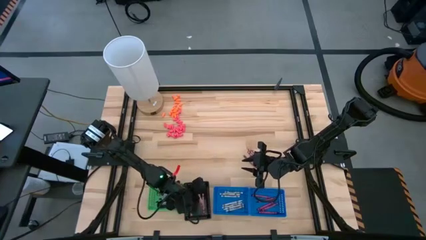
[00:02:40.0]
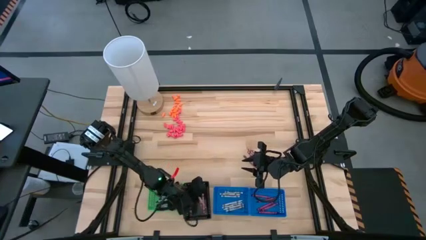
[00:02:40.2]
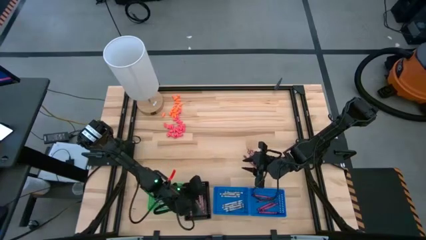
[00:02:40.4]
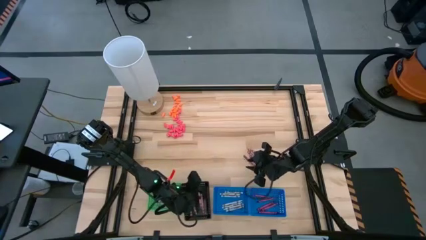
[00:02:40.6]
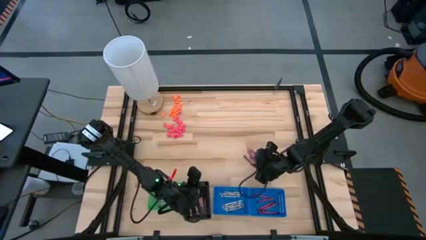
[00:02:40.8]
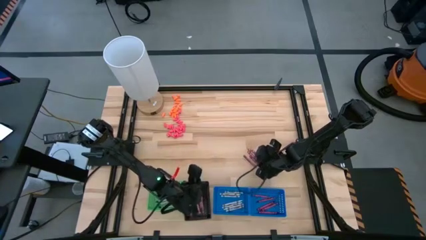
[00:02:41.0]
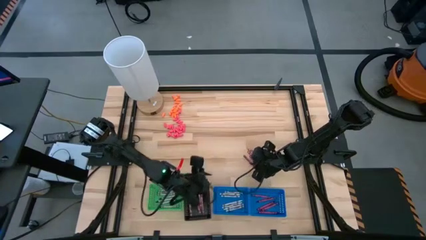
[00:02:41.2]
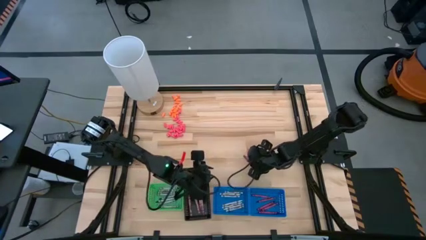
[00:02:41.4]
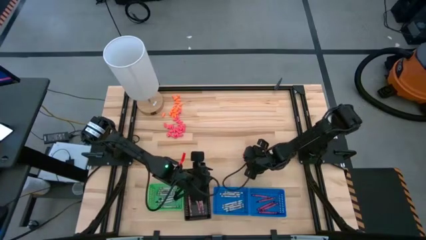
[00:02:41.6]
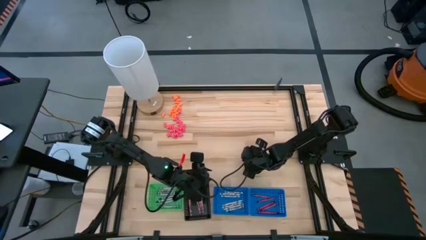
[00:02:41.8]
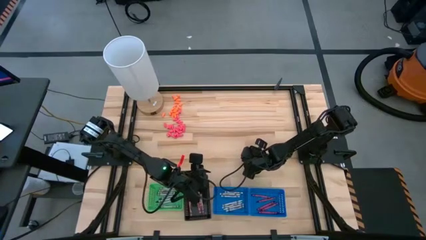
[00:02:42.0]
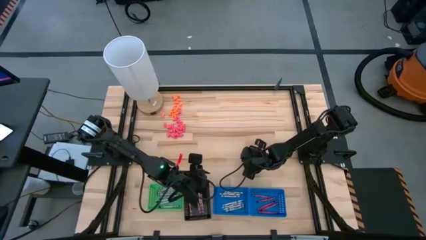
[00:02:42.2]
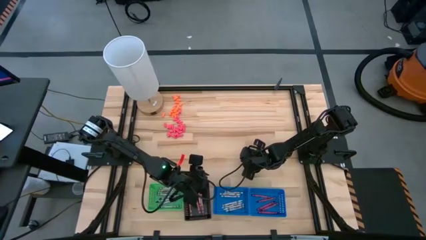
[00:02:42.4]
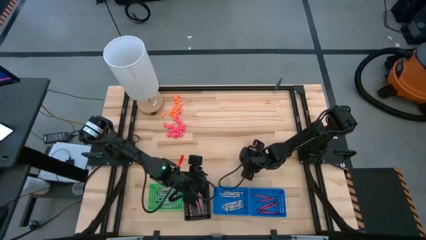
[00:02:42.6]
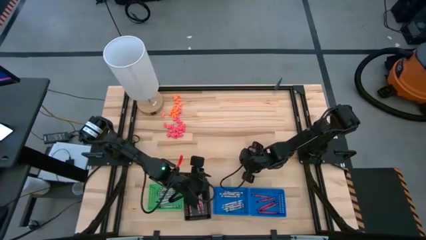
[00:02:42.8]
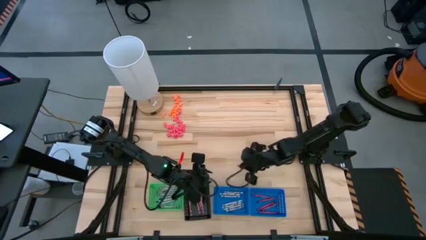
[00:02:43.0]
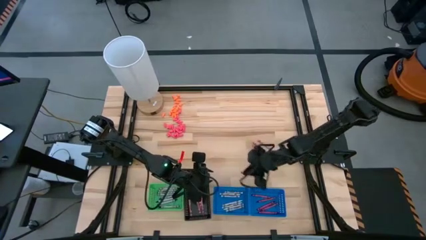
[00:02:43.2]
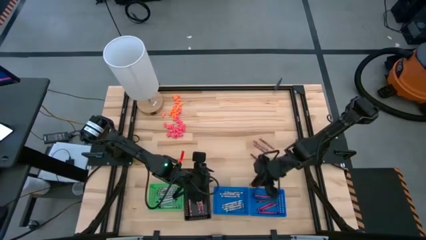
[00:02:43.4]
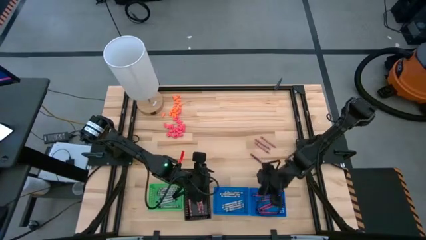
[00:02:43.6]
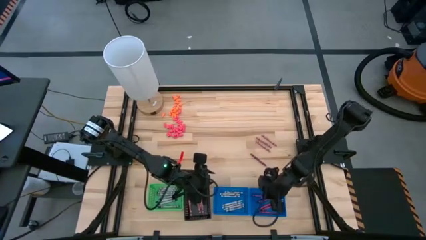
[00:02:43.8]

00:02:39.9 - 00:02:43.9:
Task: Sort crayons
Put the red crayon into the right blue bin

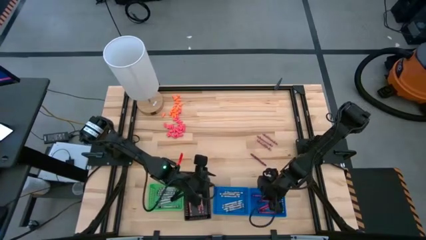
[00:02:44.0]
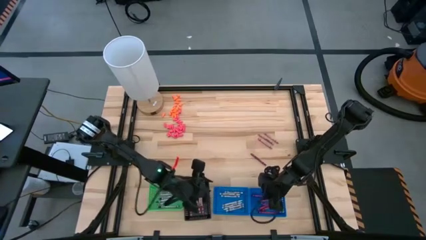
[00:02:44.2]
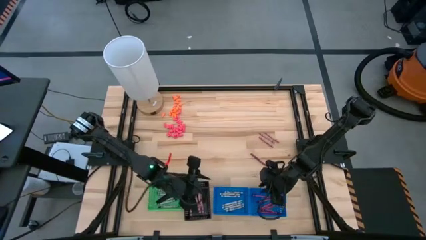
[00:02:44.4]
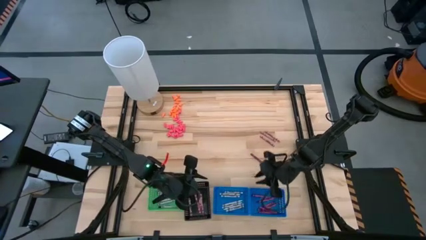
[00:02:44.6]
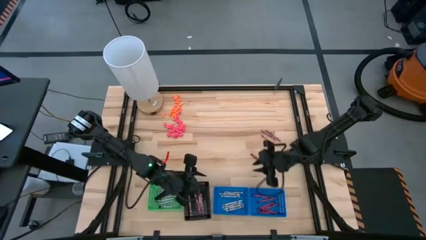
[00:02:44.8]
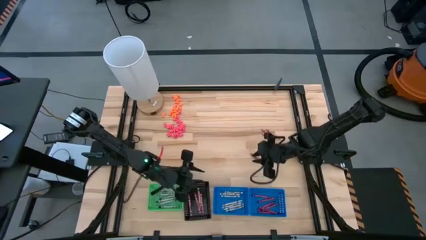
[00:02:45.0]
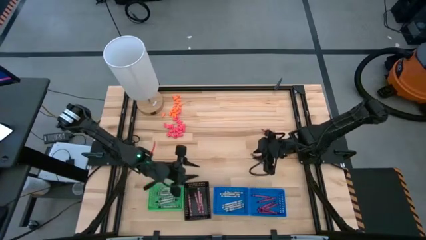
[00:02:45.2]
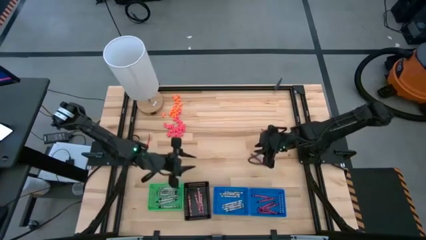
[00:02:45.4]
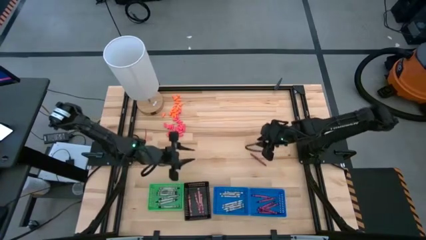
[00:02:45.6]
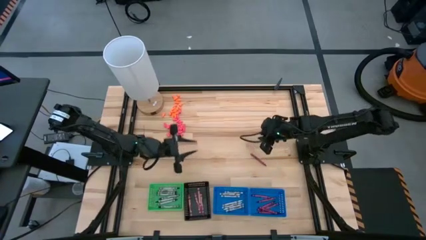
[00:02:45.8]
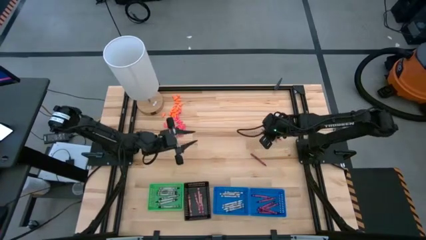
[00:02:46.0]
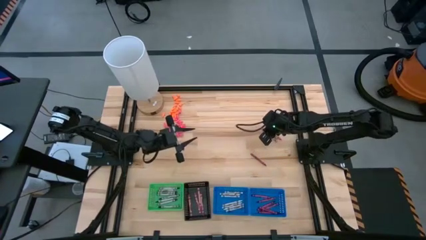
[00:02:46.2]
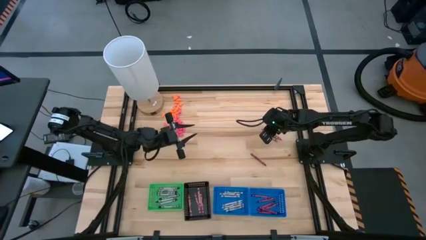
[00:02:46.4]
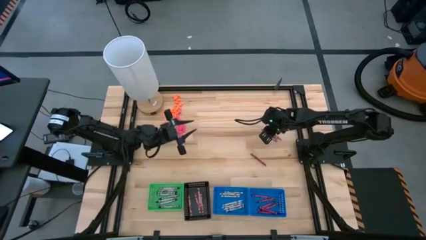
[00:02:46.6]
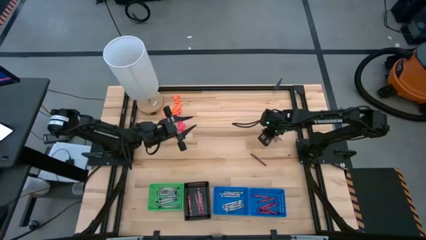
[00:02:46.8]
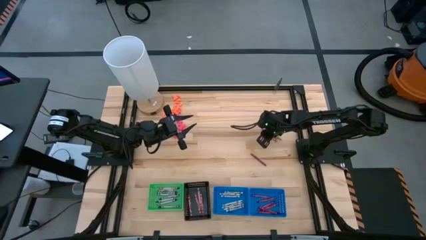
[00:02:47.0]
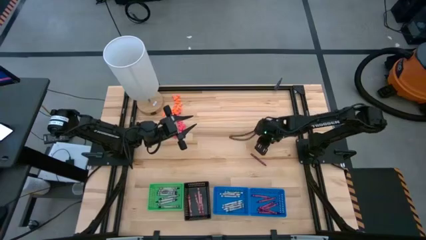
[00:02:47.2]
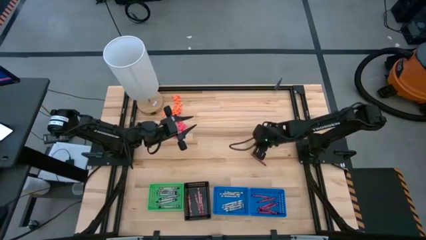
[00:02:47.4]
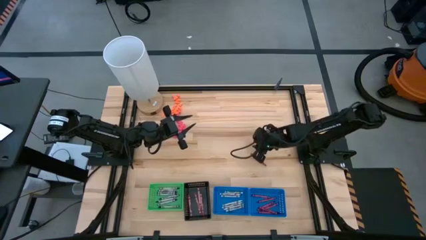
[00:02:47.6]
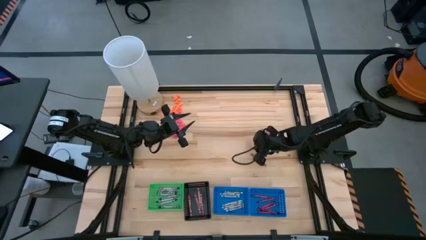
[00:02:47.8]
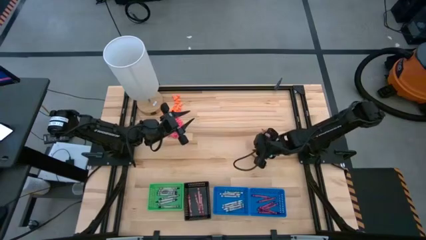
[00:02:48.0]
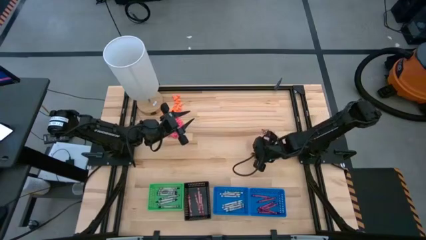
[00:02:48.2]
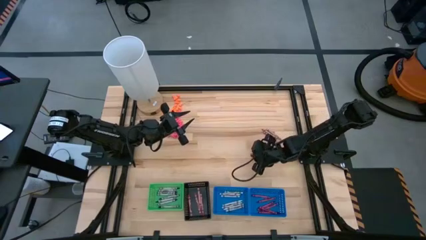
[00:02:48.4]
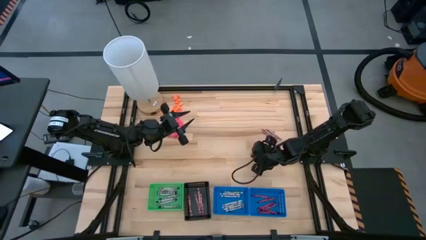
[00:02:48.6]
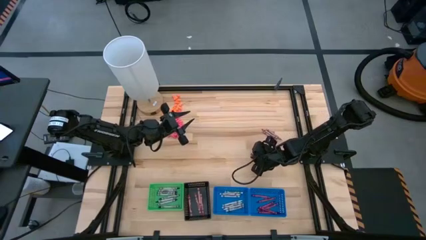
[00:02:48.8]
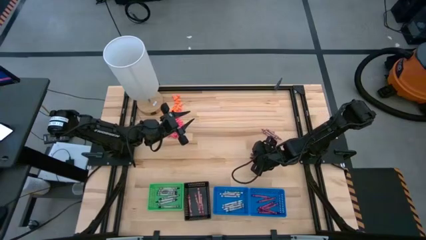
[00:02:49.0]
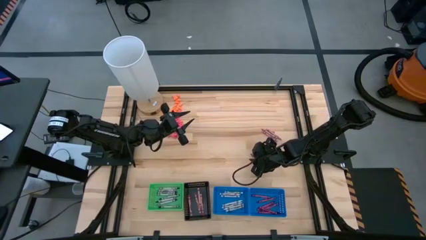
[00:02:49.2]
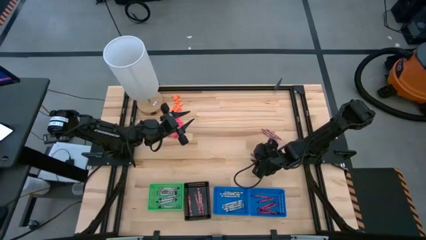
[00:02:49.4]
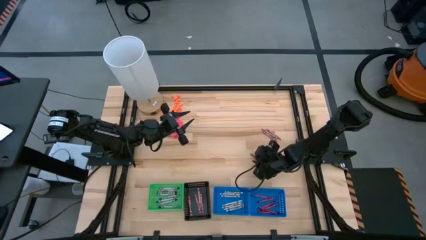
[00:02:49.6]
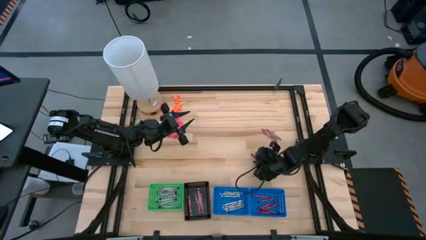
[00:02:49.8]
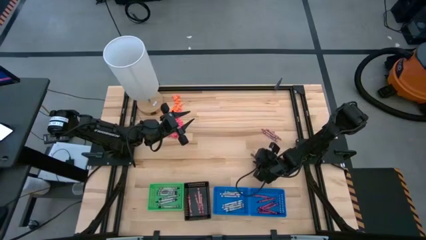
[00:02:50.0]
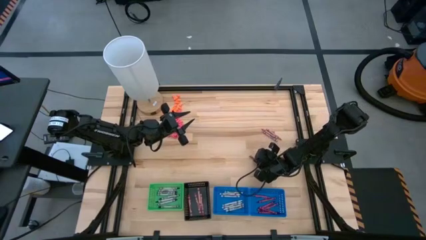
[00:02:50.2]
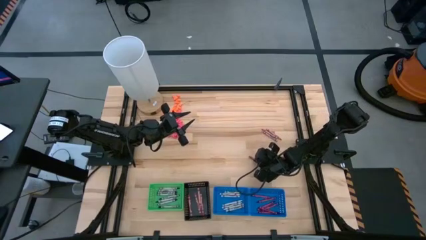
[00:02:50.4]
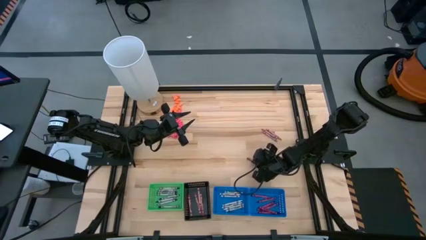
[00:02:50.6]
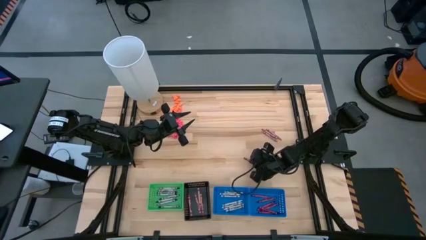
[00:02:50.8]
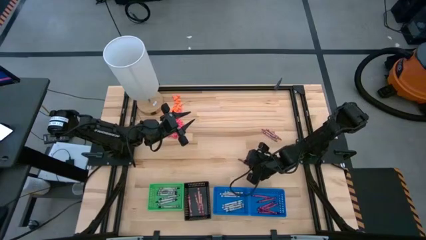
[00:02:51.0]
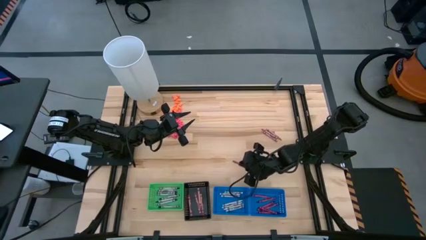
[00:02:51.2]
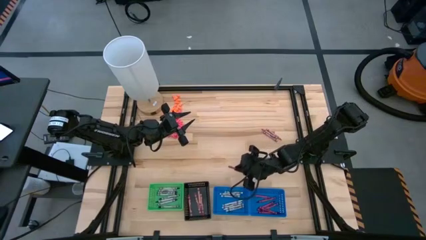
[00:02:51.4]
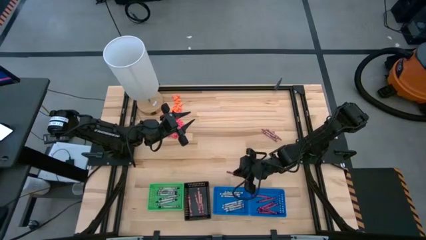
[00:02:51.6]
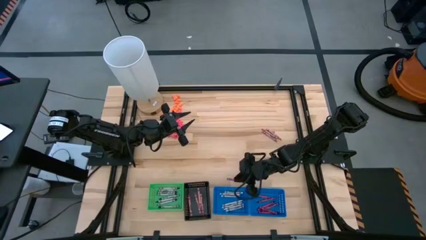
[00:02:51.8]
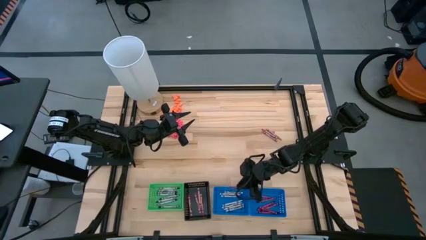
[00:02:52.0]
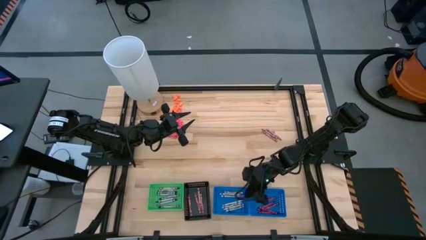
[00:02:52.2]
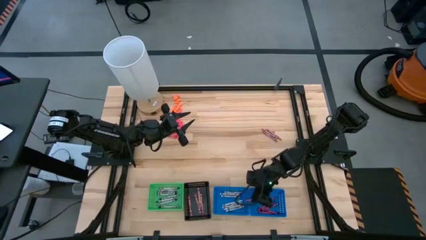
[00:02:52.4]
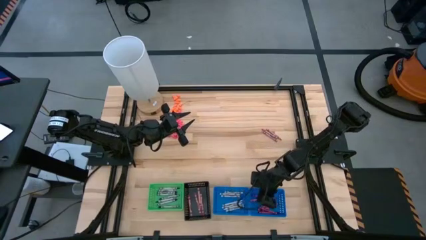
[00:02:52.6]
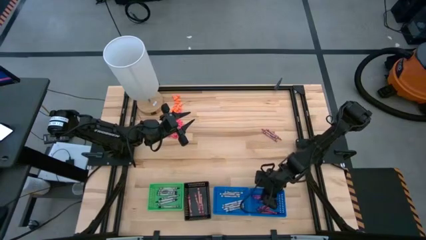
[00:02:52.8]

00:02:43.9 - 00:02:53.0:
Put the red crayon into the right blue bin
